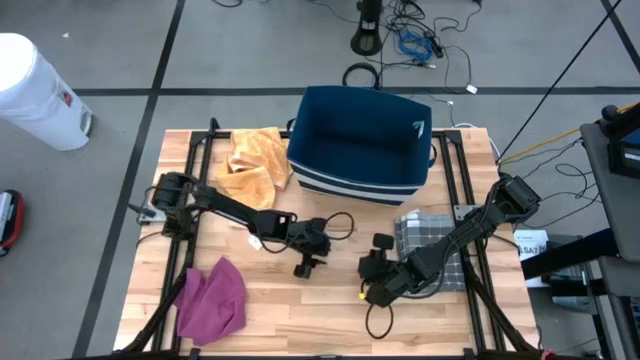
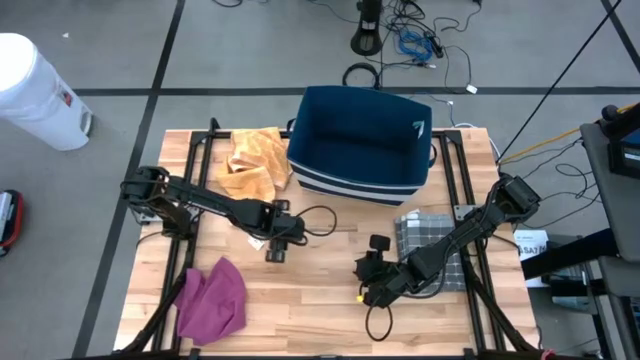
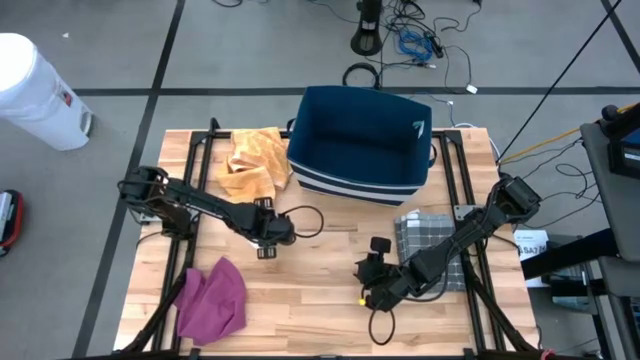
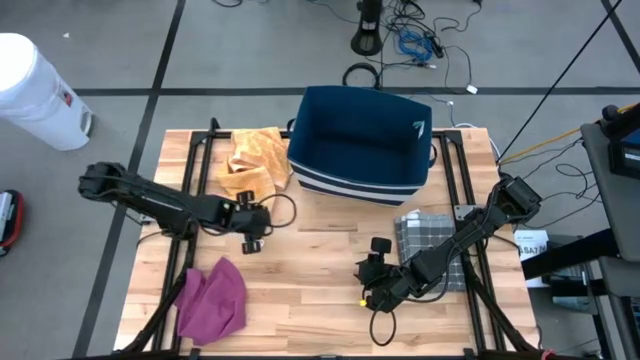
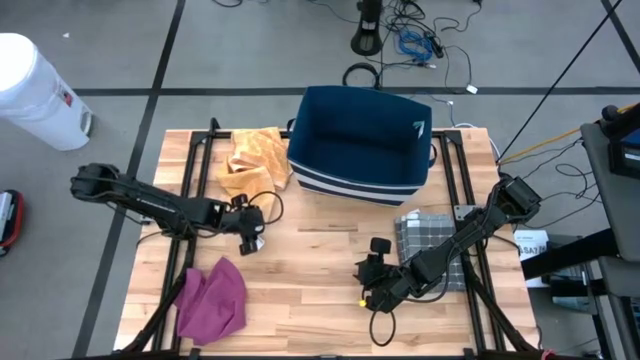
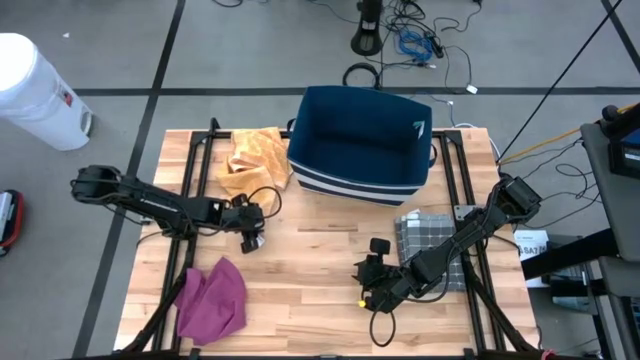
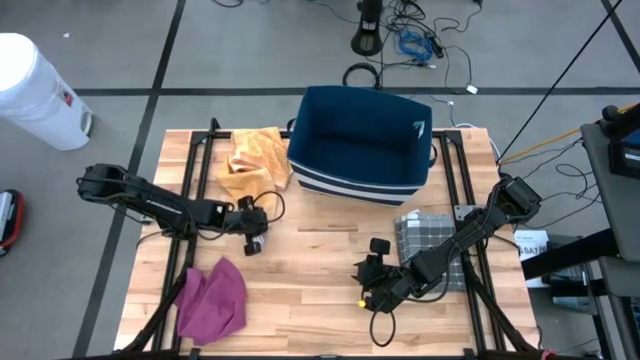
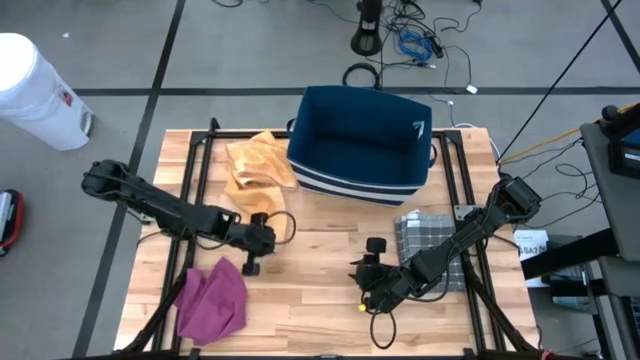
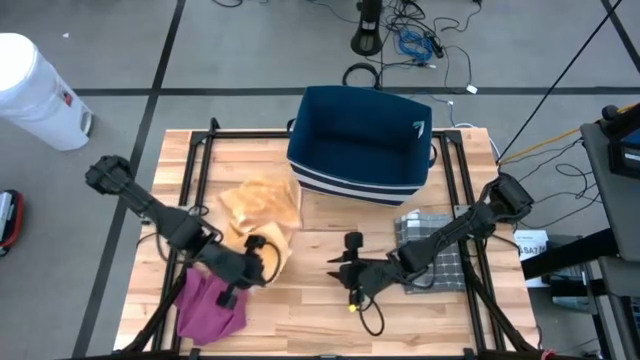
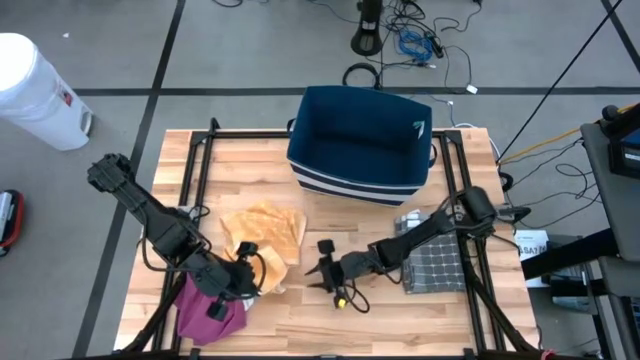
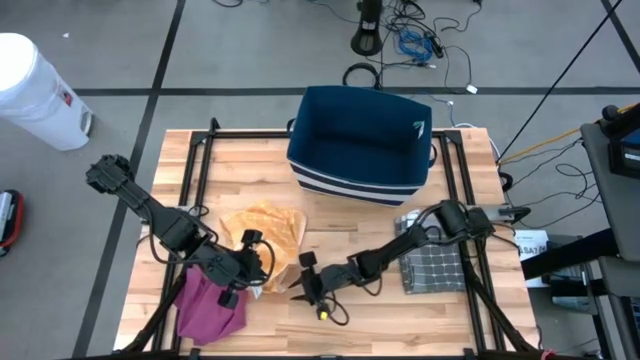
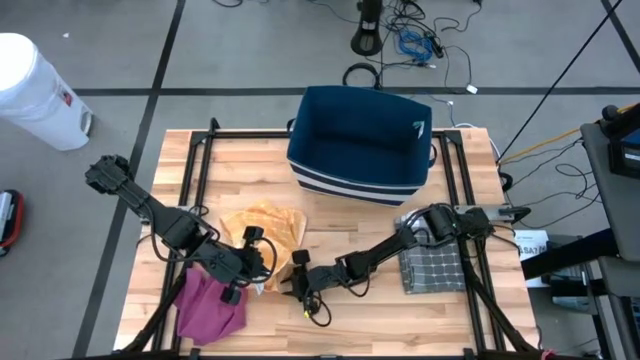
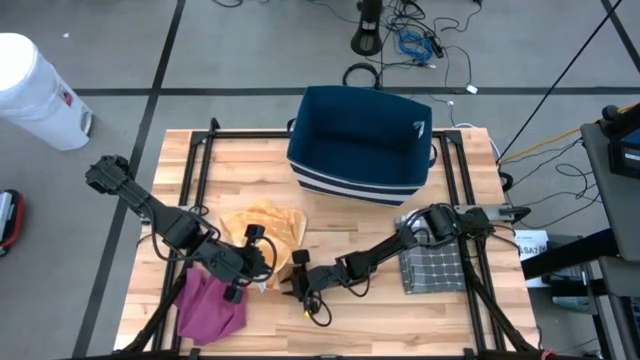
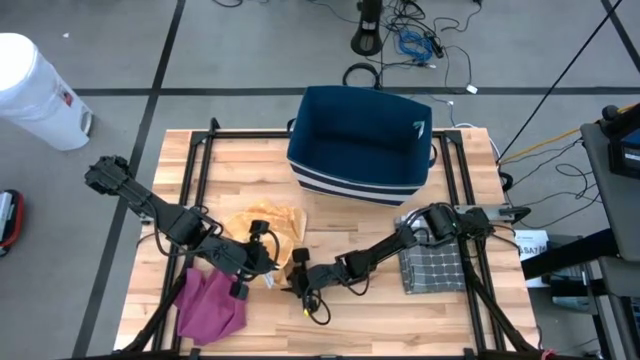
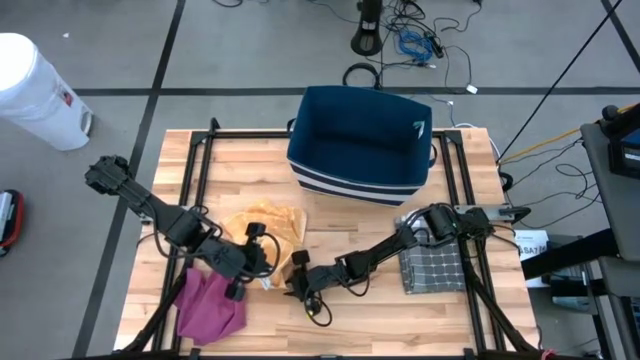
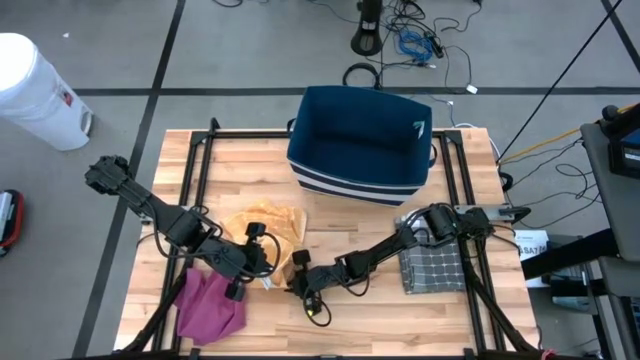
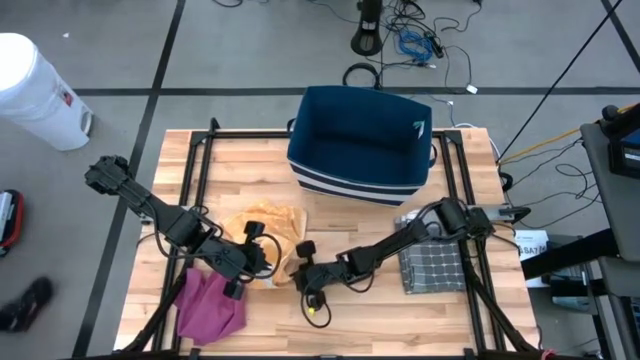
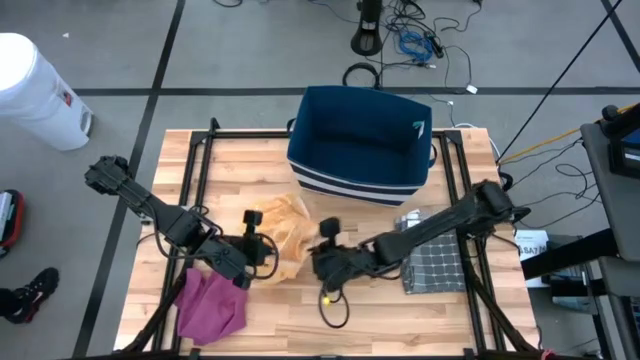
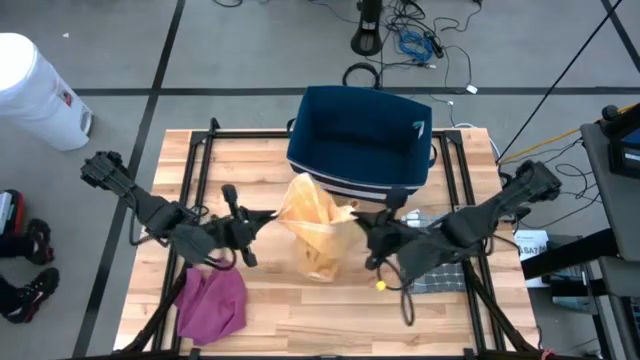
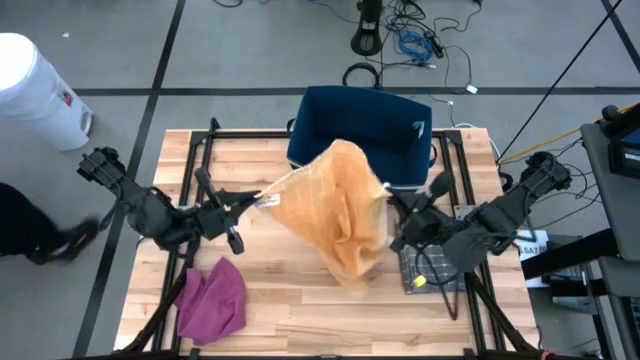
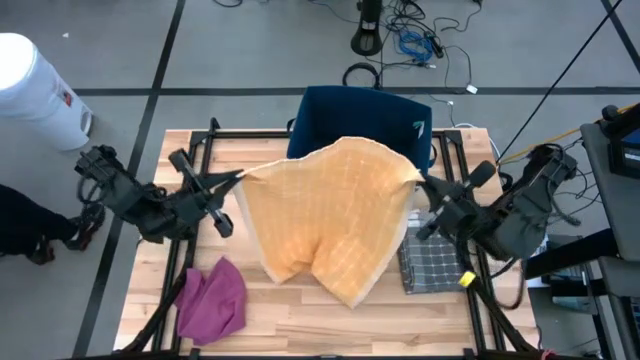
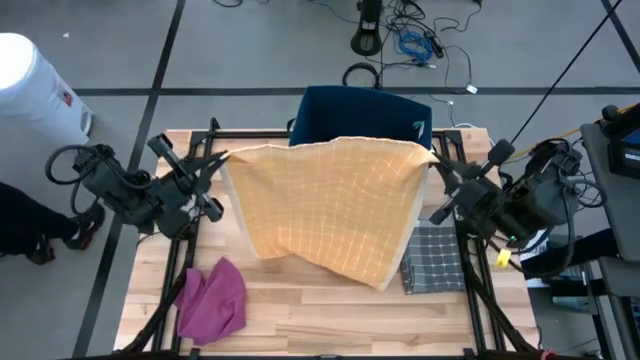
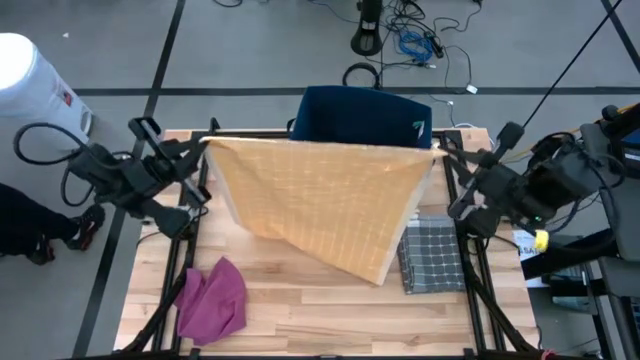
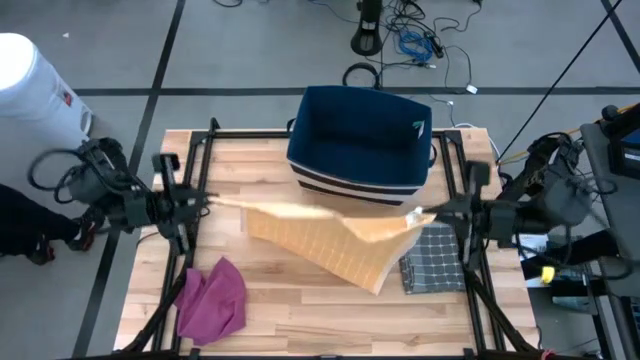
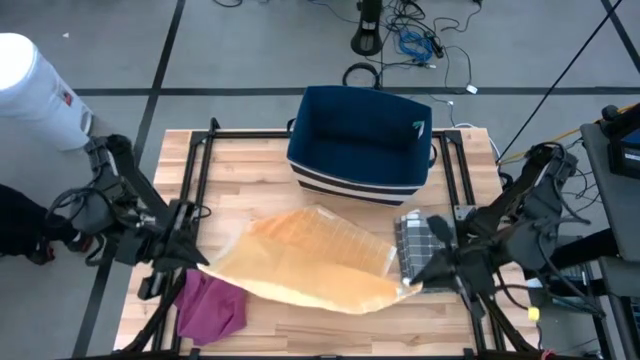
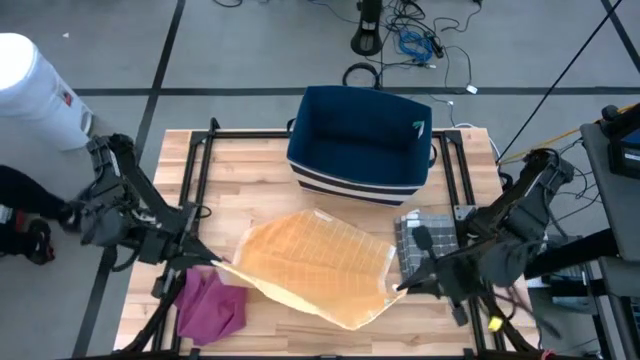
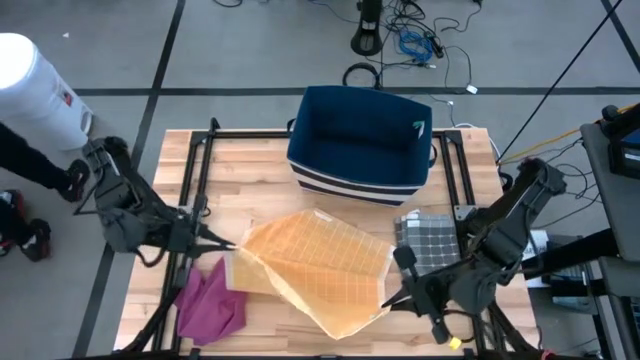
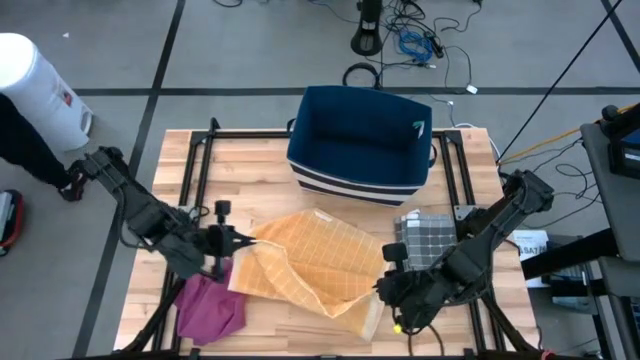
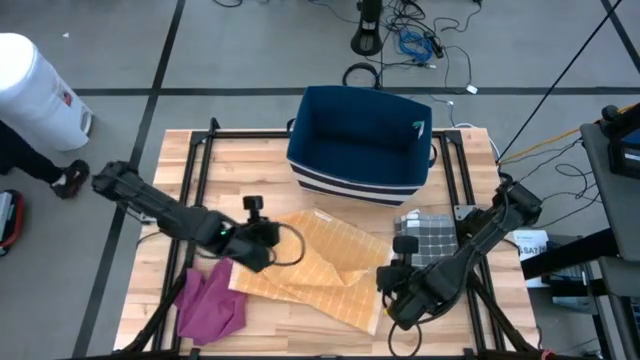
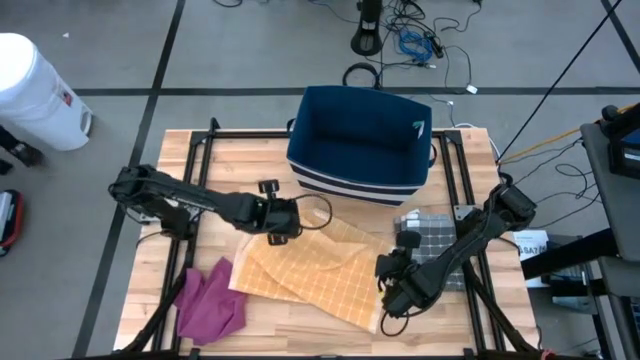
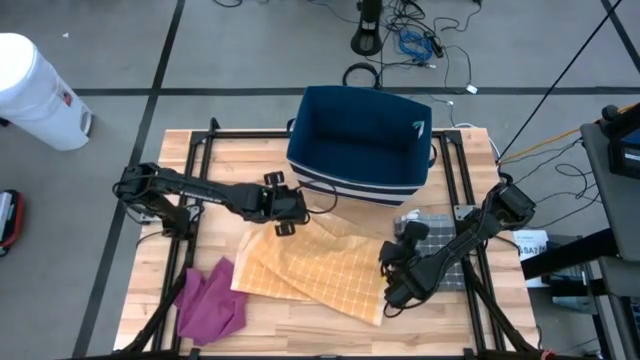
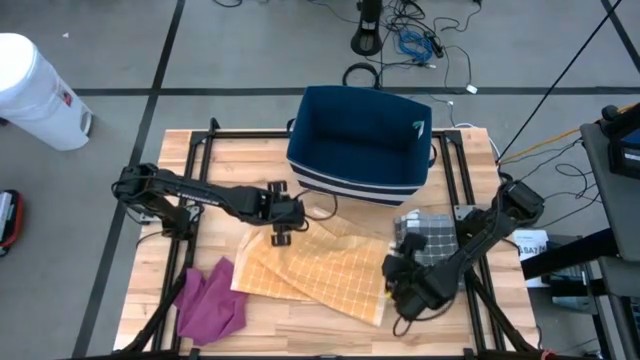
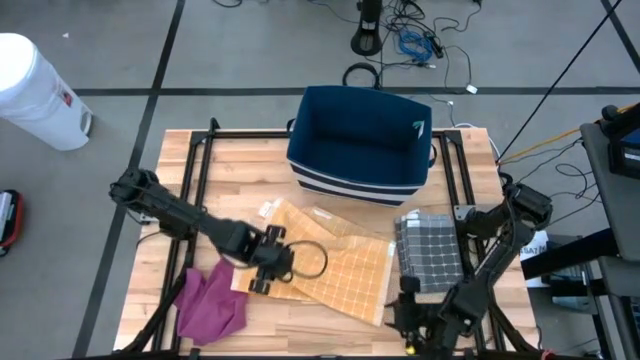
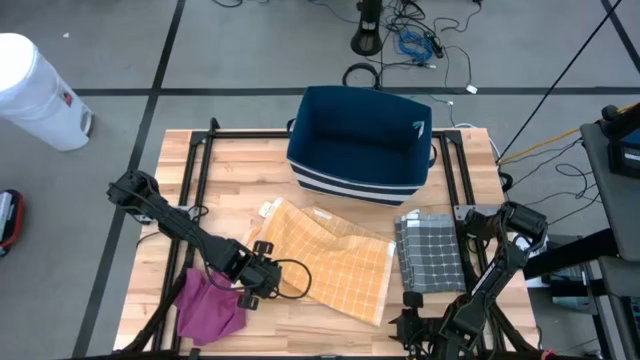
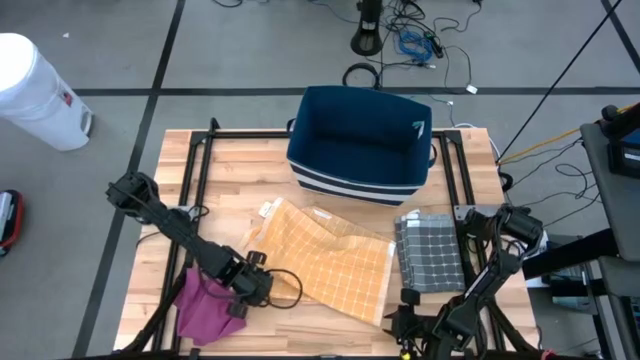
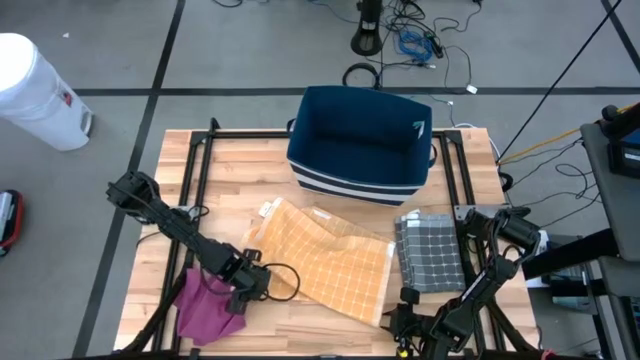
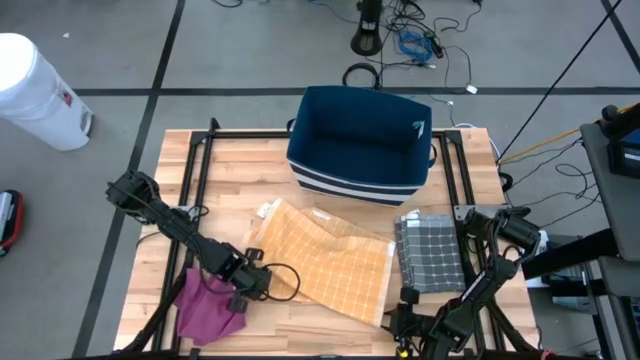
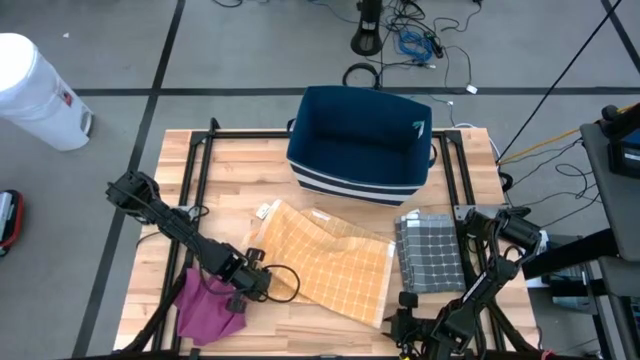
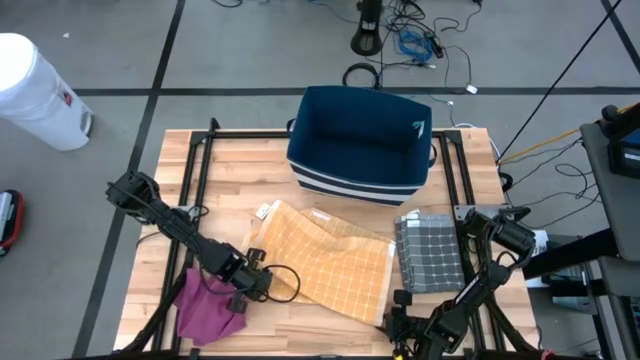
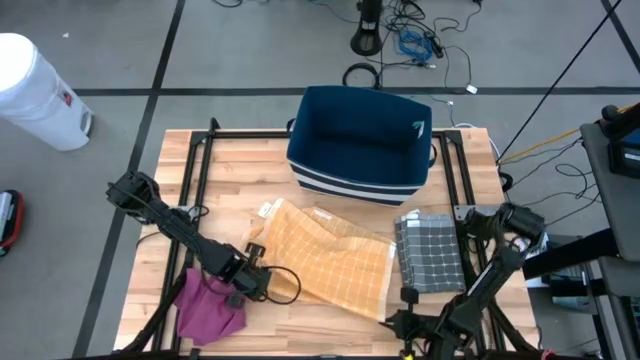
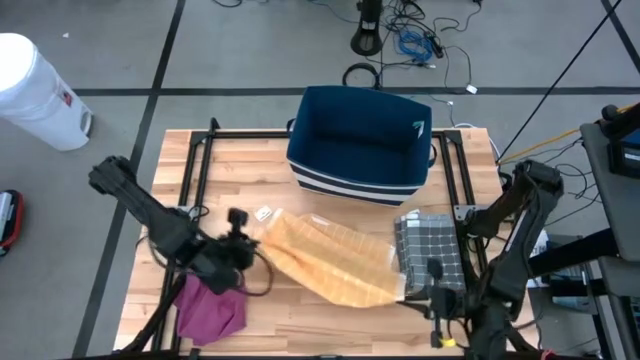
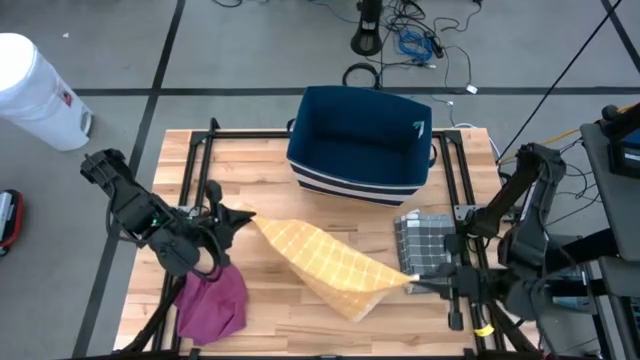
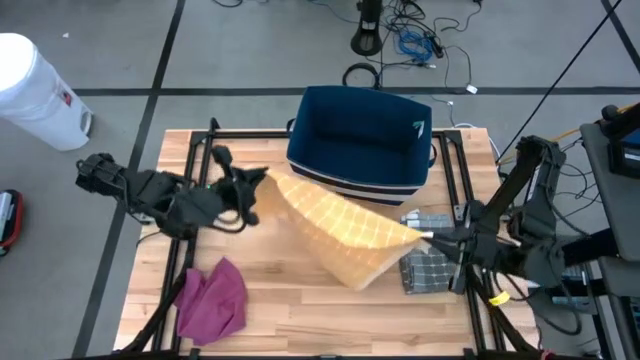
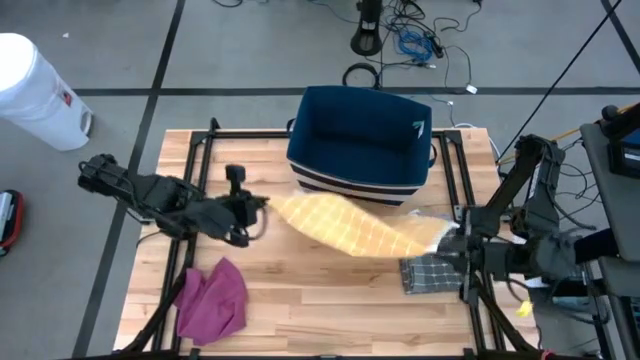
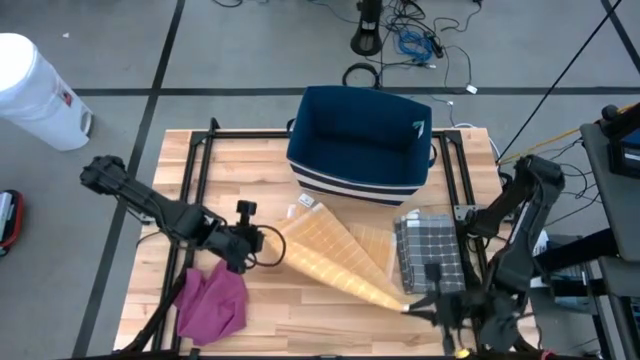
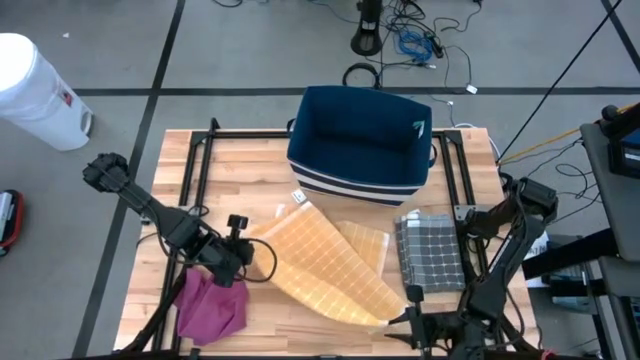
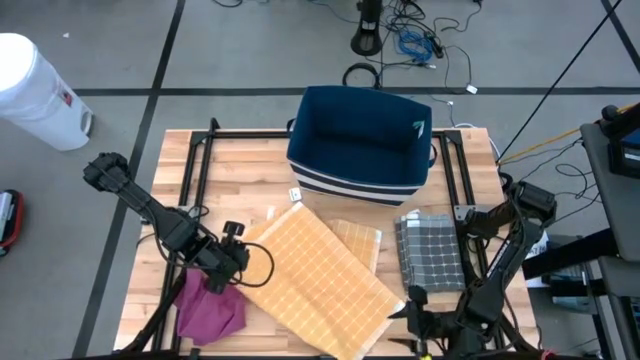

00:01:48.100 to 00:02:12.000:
Task: Fold towel
Fold the orange patterned towel
